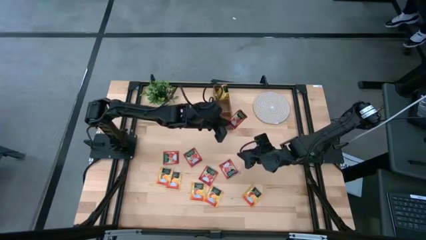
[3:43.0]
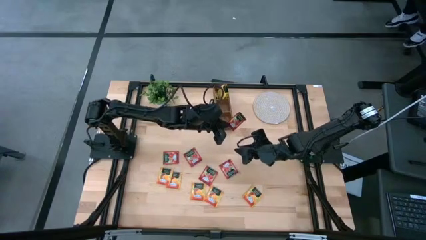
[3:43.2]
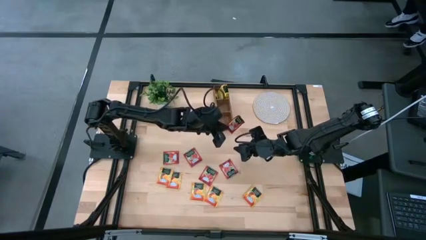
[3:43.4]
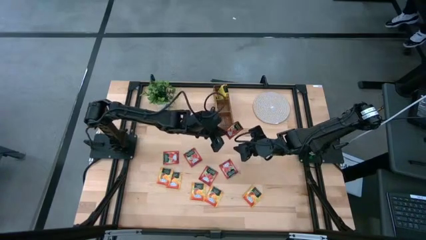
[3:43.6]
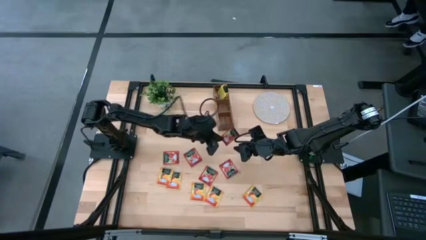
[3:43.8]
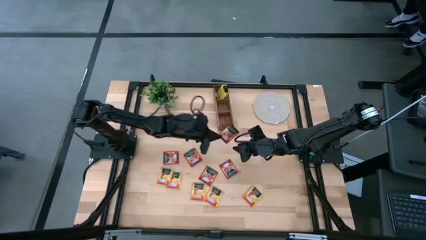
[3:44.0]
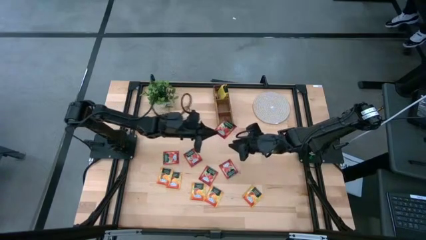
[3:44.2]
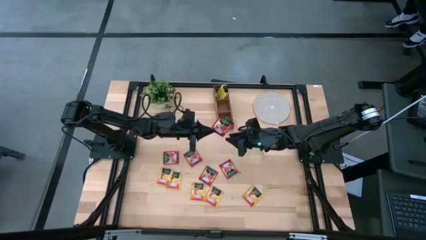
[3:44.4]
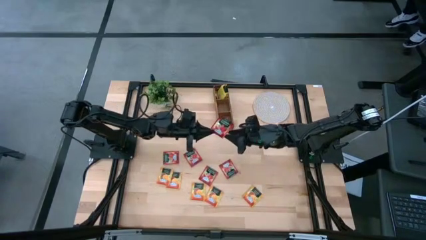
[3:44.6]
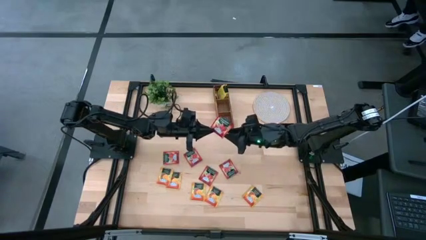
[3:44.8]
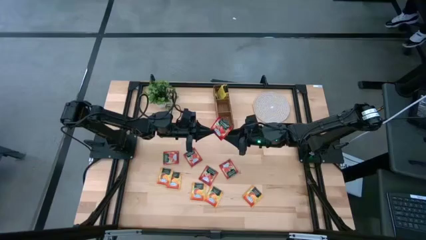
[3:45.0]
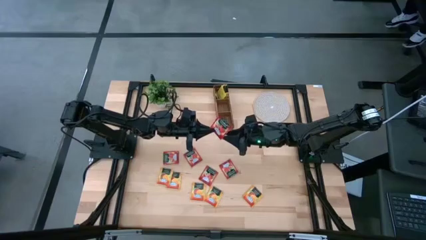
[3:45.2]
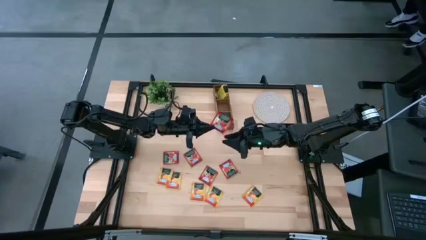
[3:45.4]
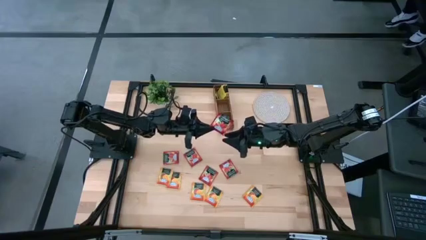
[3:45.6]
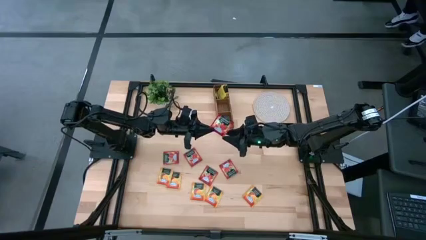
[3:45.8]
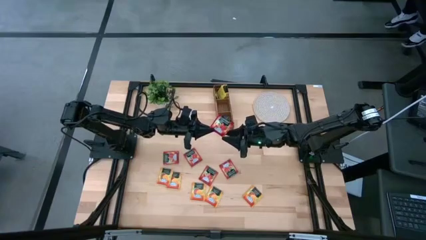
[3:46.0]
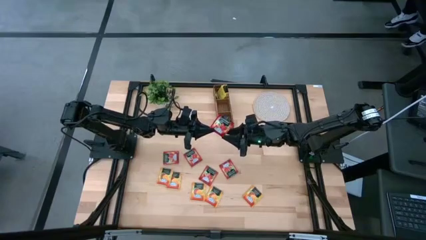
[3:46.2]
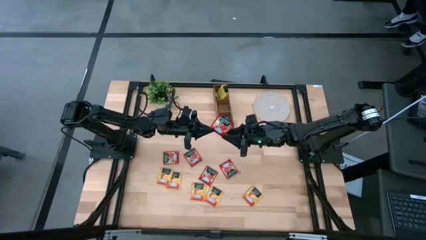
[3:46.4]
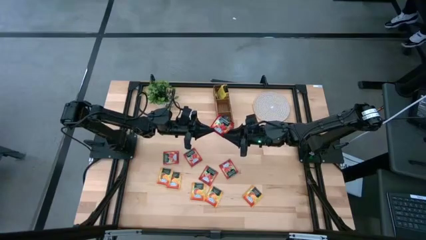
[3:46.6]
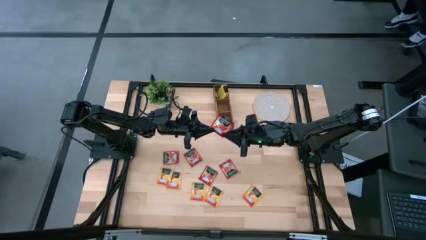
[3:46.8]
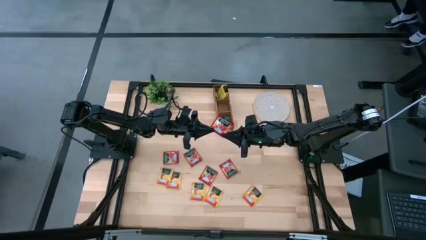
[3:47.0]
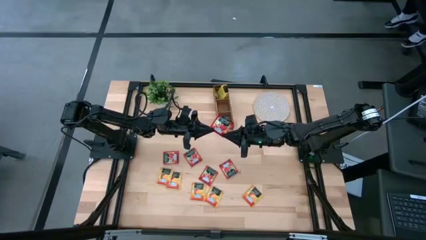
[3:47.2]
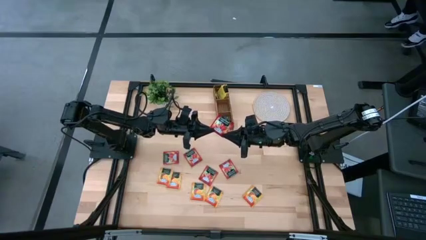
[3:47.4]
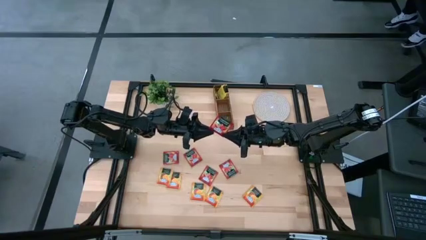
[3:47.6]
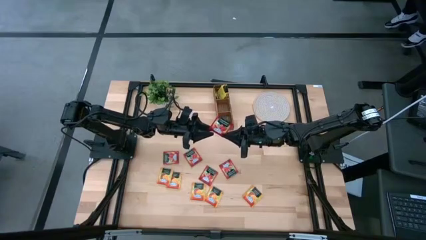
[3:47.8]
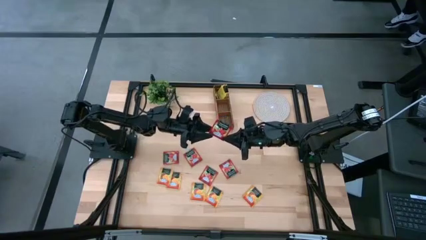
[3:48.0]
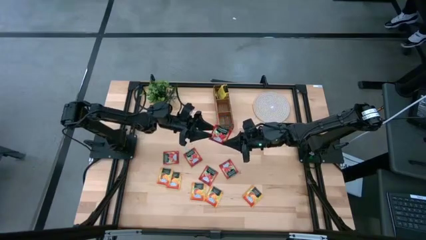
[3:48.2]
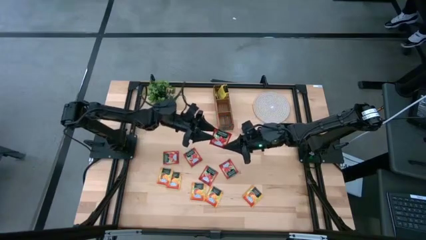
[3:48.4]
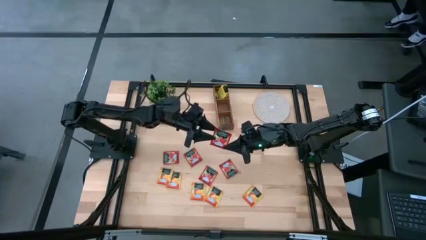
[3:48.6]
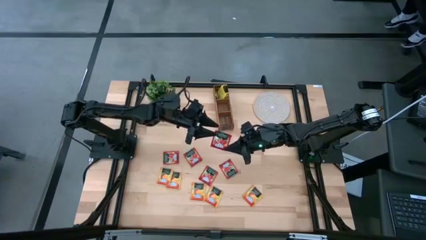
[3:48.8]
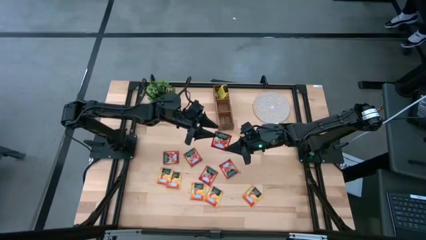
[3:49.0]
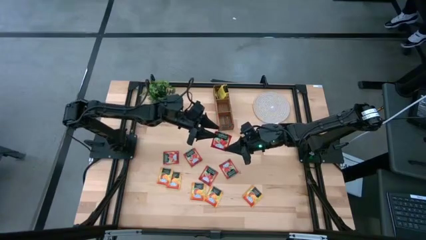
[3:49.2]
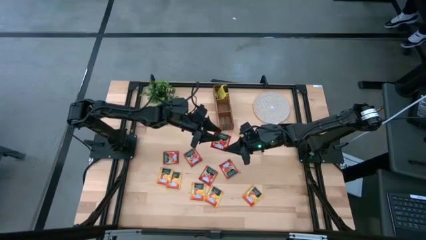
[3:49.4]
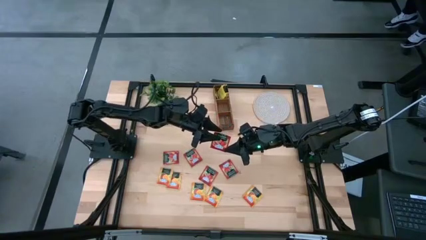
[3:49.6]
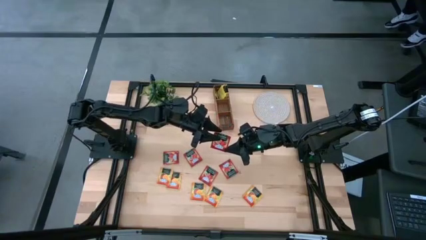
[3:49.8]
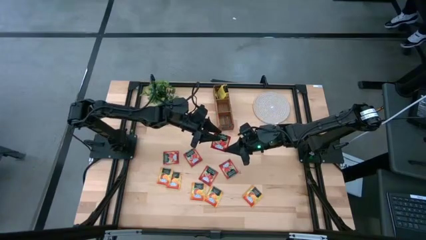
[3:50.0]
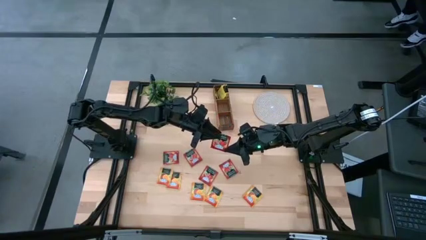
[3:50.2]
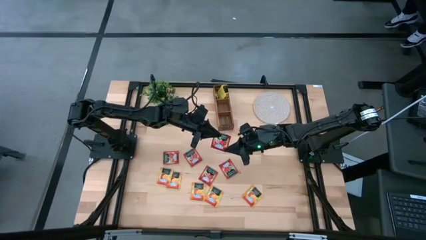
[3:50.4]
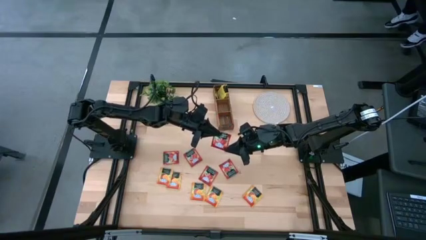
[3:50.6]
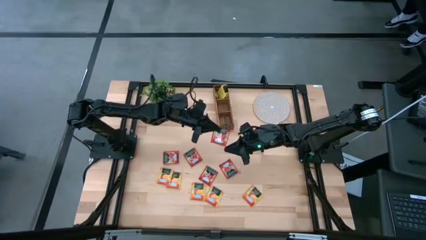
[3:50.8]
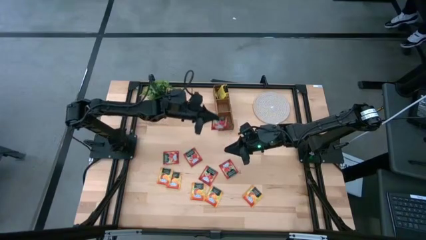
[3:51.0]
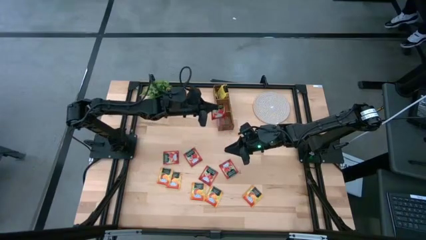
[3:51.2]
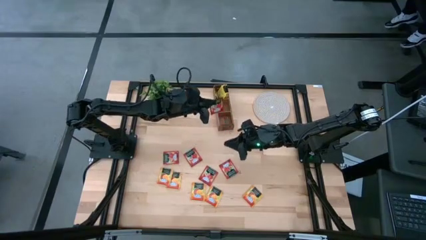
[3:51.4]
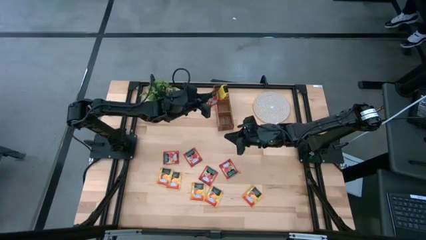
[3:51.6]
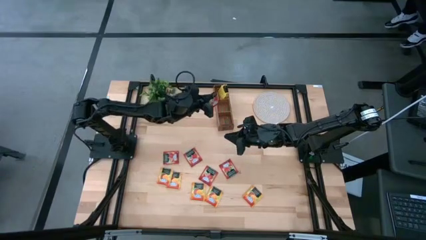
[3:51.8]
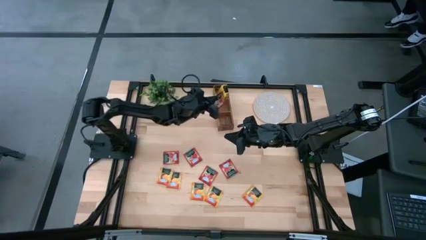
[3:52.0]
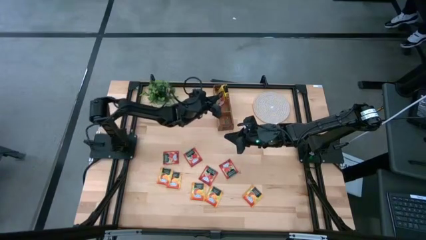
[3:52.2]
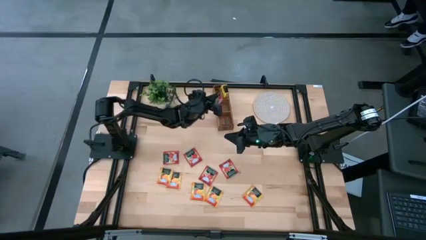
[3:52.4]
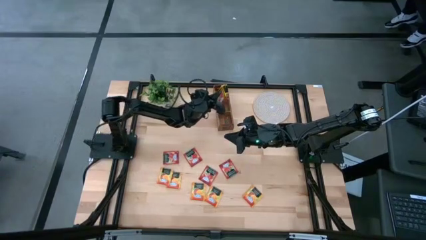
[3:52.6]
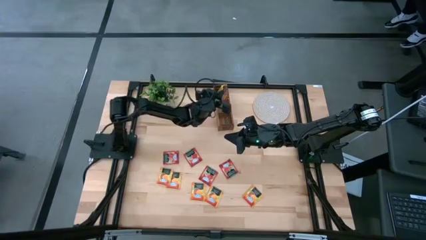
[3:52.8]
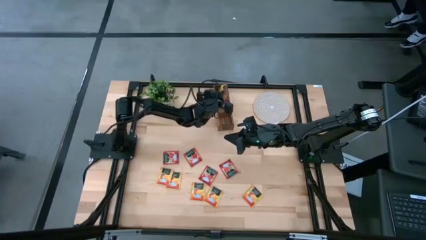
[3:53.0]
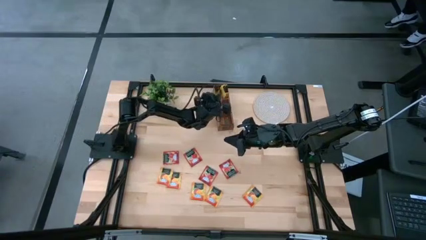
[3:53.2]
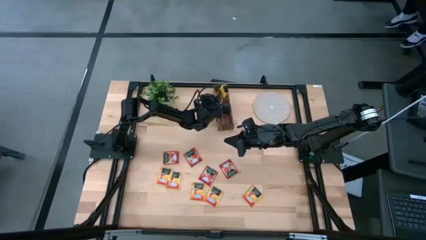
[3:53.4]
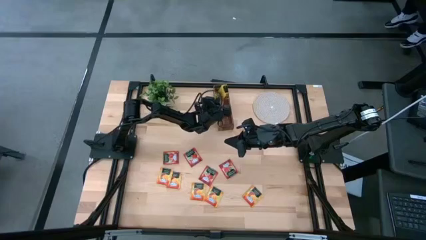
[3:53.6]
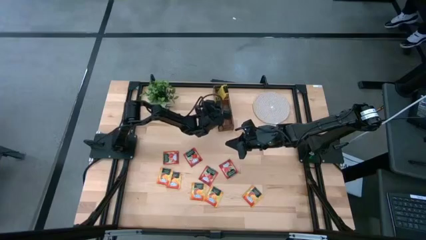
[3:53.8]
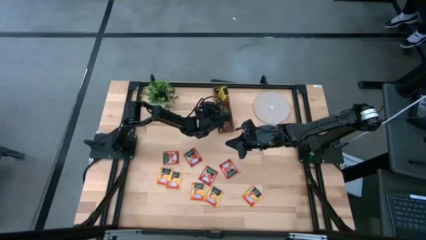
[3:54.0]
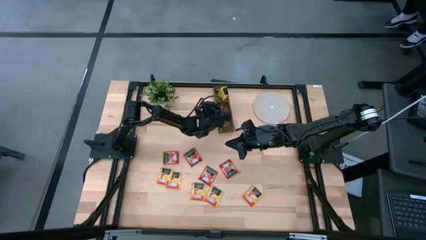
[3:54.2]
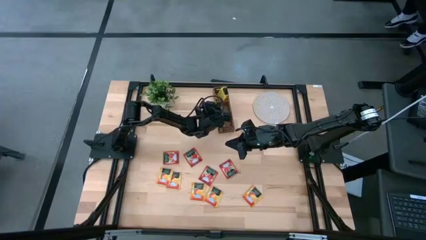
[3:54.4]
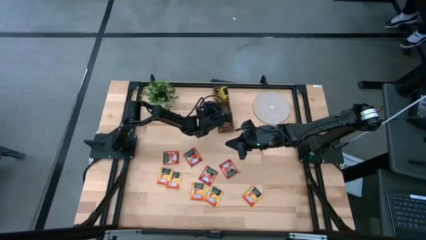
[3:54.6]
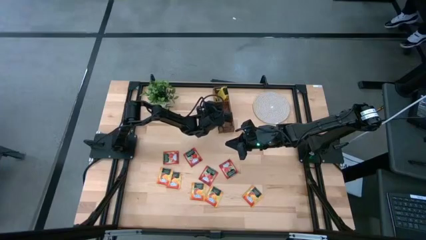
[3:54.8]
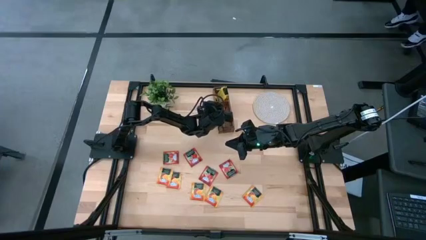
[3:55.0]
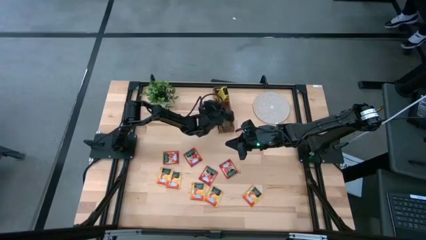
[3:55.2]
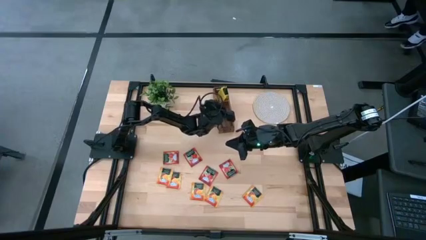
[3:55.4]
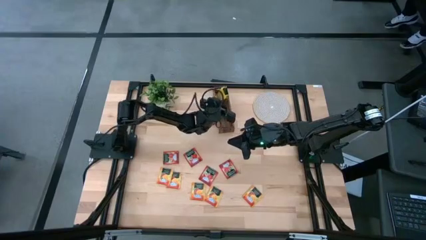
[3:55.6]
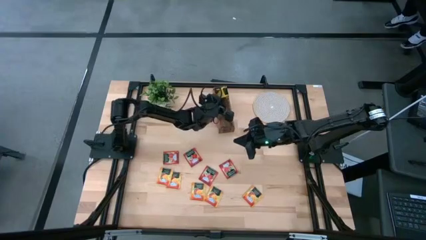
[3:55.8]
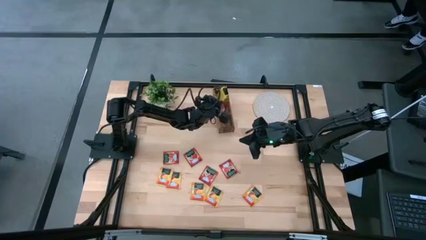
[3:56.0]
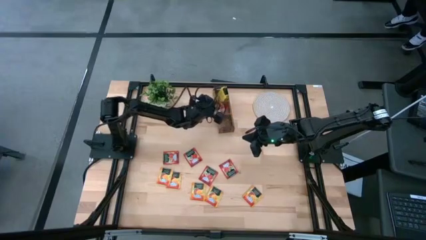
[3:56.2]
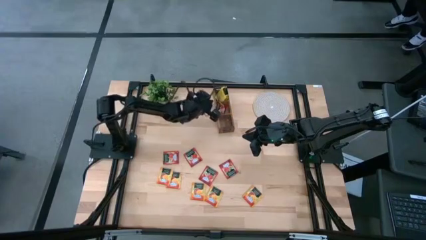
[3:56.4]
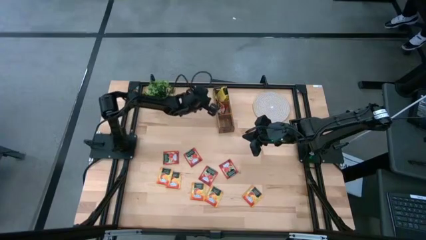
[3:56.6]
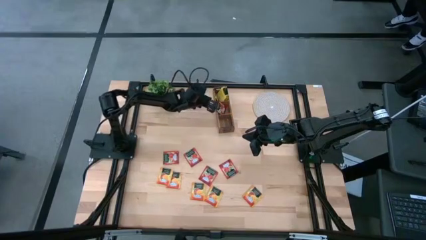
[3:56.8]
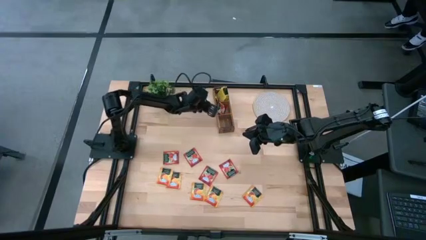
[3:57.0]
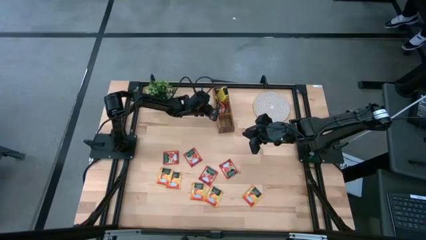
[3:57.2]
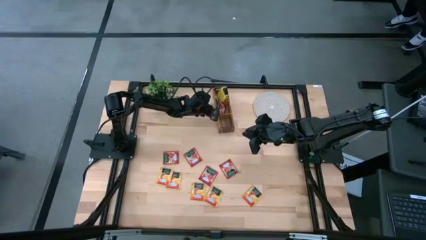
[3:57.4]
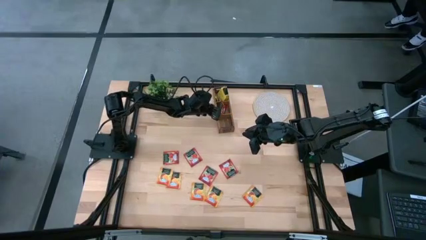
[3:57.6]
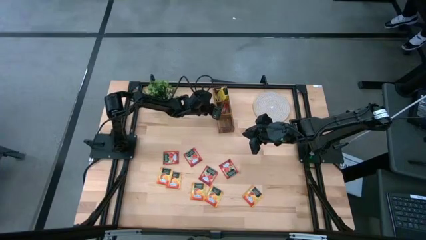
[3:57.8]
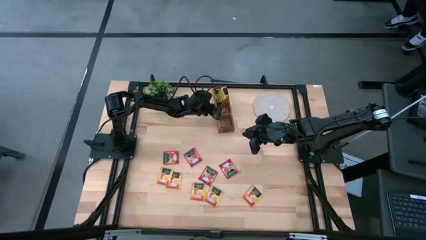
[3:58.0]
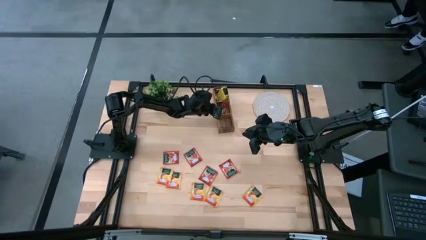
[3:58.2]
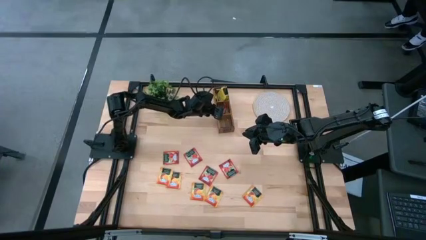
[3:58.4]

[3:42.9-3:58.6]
Task: Pick & Place Tea
Put the red tea bag into the middle section of the wooden organizer

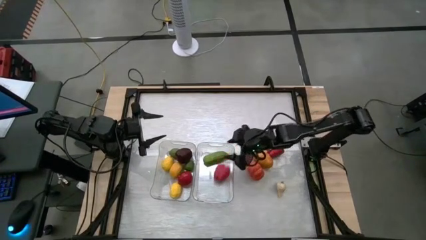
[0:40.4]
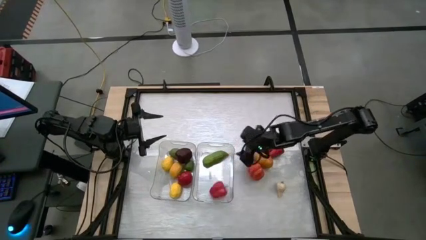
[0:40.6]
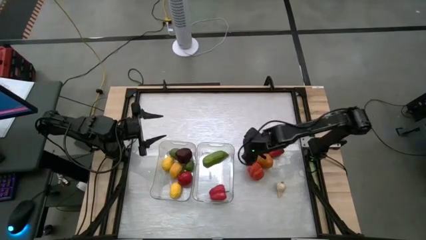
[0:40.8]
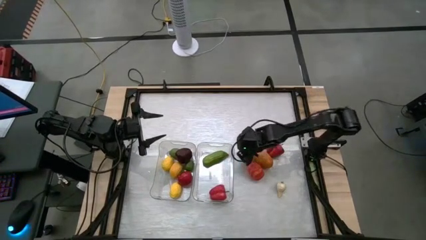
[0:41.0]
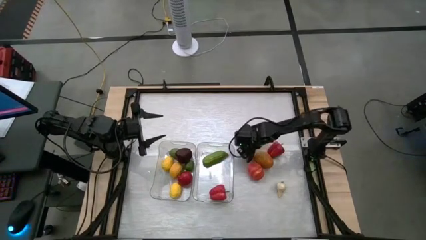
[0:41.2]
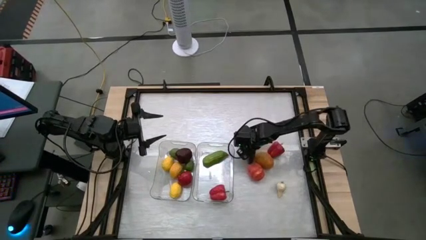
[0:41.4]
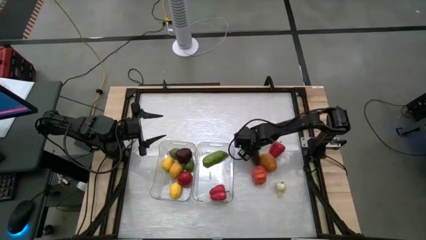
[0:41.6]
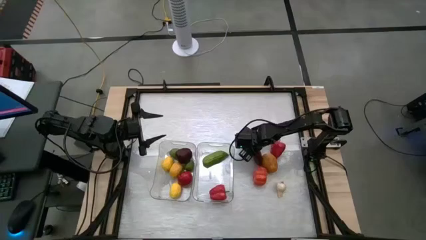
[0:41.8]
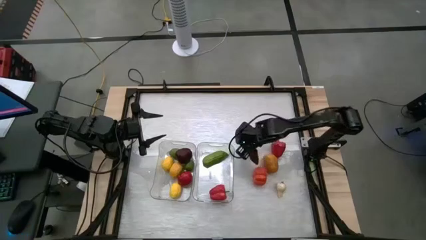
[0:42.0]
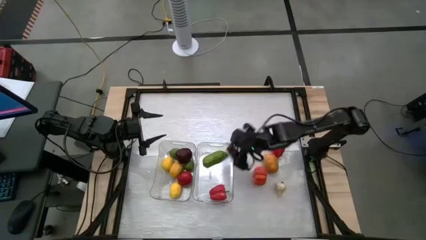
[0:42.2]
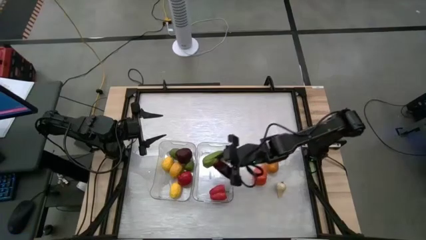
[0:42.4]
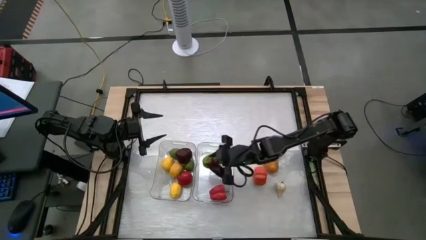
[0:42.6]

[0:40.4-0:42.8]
Task: Sort produce into baskets
Put the chili pepper into the right transparent bin
